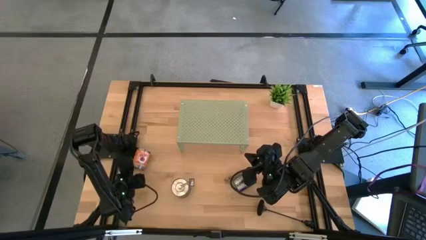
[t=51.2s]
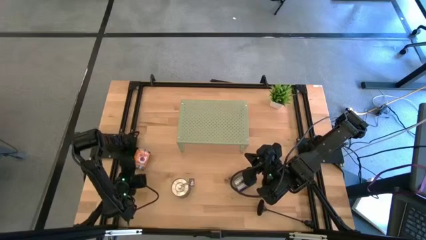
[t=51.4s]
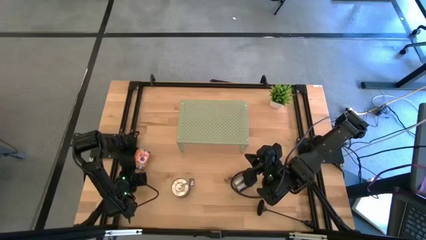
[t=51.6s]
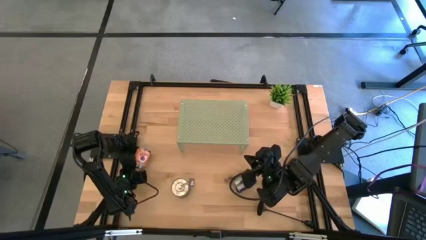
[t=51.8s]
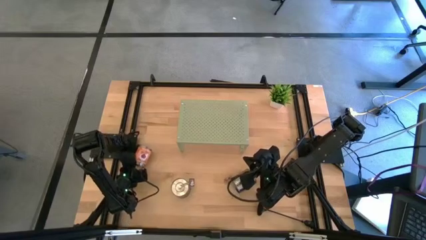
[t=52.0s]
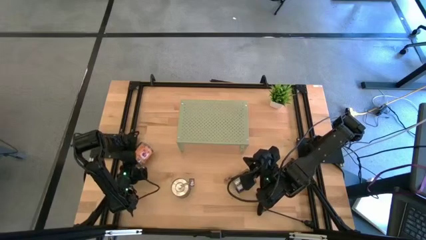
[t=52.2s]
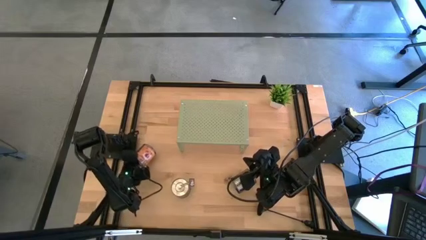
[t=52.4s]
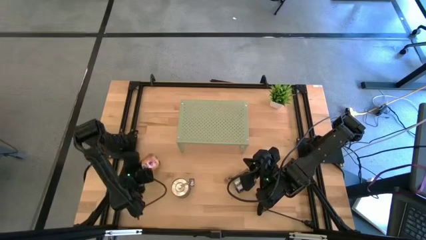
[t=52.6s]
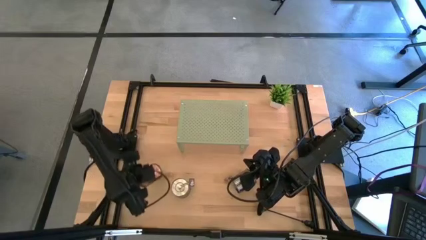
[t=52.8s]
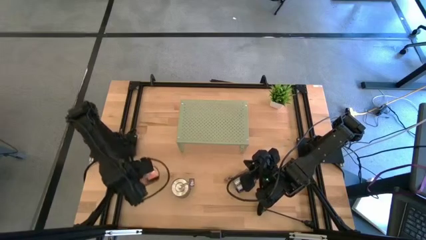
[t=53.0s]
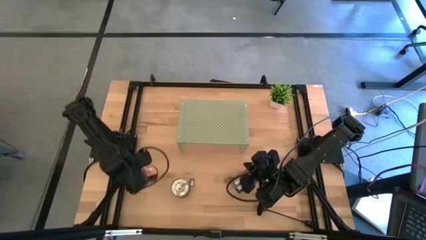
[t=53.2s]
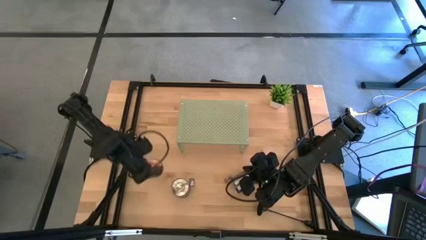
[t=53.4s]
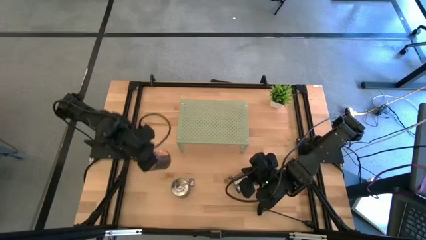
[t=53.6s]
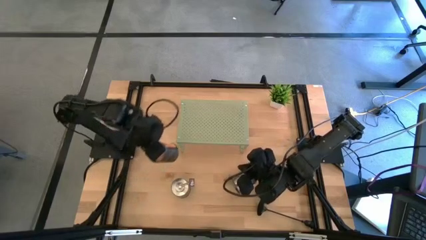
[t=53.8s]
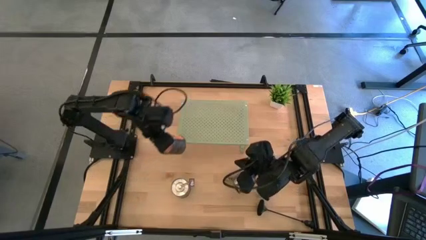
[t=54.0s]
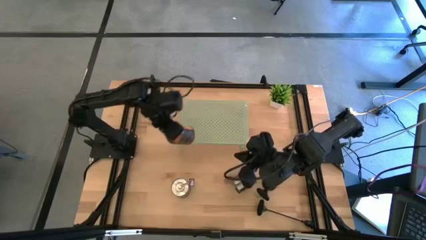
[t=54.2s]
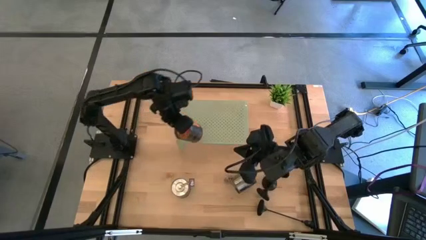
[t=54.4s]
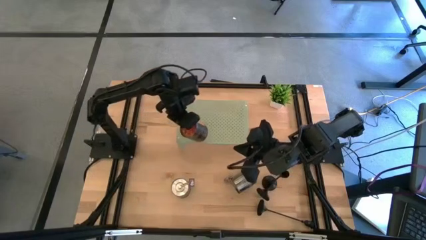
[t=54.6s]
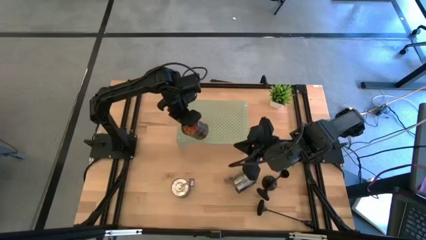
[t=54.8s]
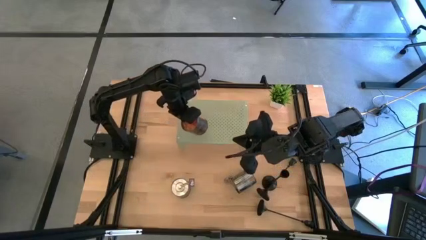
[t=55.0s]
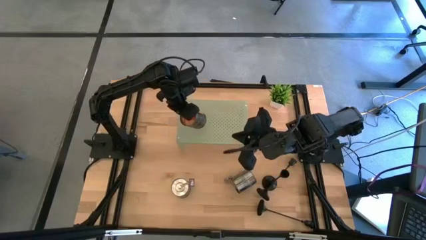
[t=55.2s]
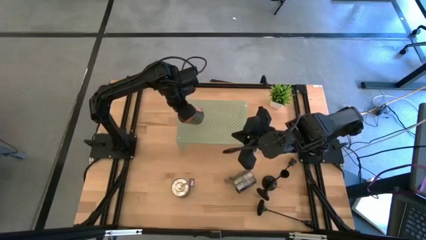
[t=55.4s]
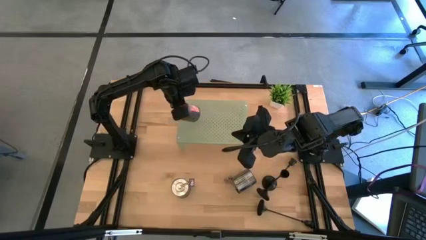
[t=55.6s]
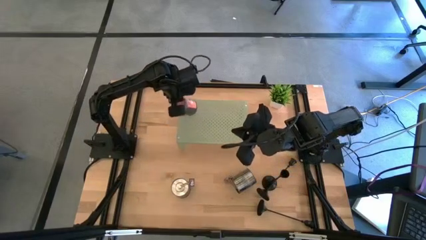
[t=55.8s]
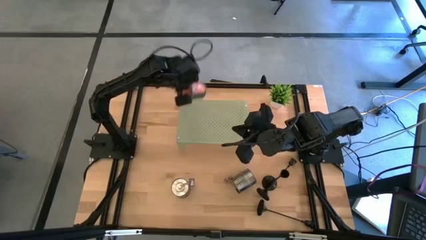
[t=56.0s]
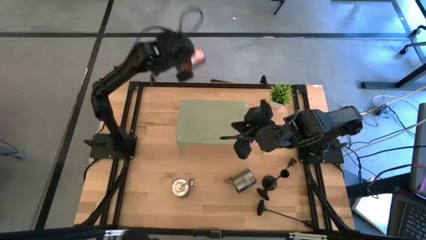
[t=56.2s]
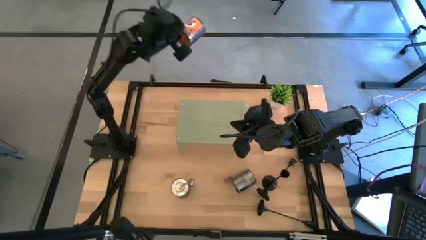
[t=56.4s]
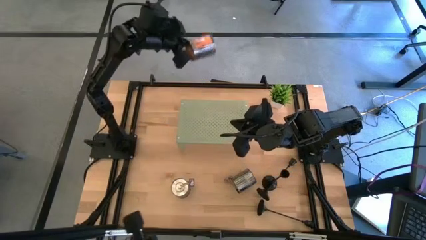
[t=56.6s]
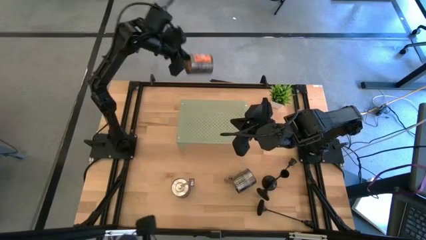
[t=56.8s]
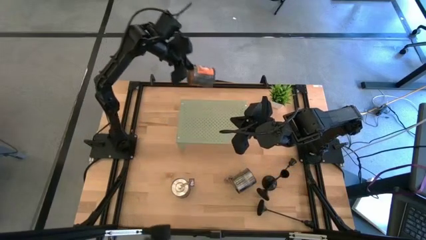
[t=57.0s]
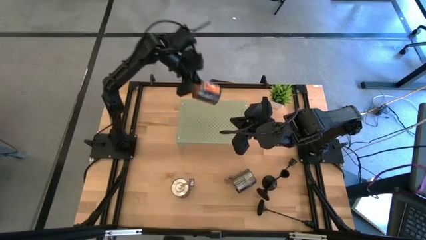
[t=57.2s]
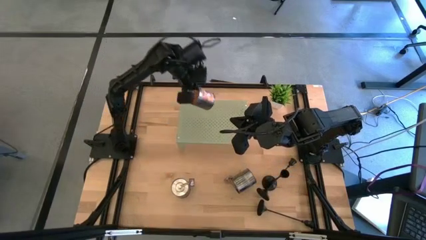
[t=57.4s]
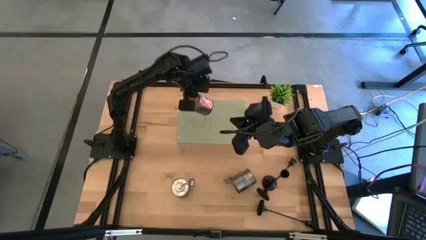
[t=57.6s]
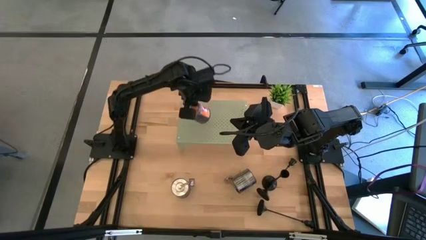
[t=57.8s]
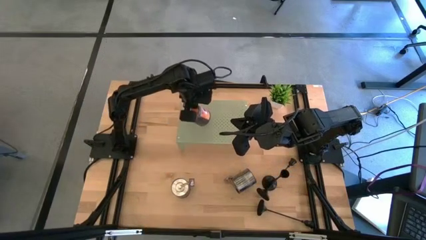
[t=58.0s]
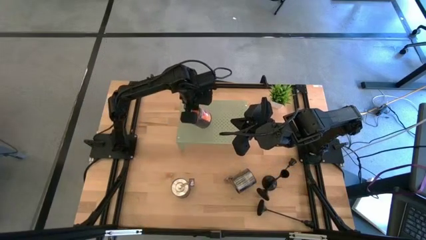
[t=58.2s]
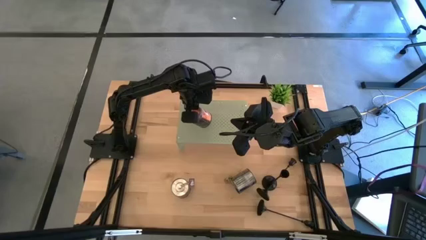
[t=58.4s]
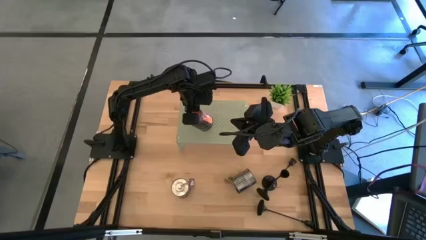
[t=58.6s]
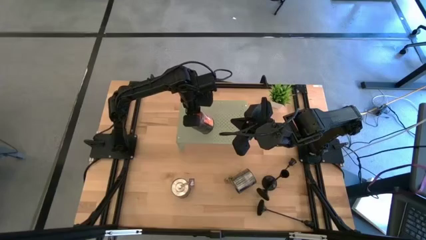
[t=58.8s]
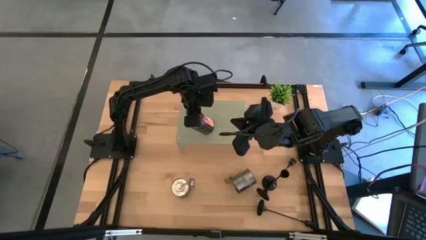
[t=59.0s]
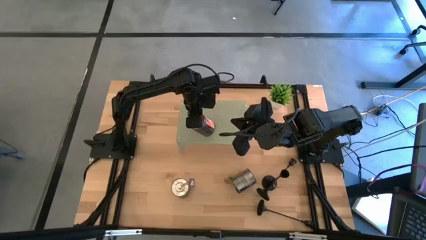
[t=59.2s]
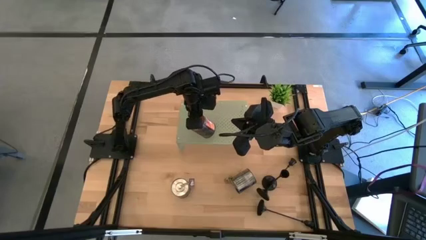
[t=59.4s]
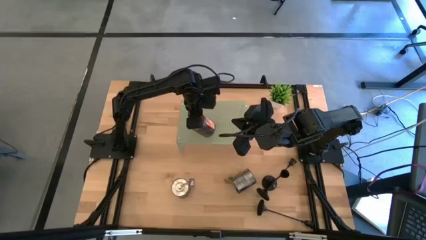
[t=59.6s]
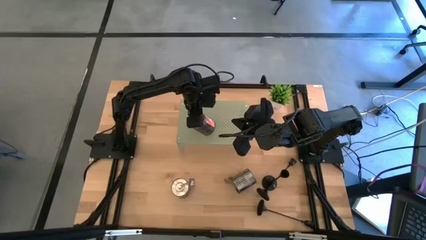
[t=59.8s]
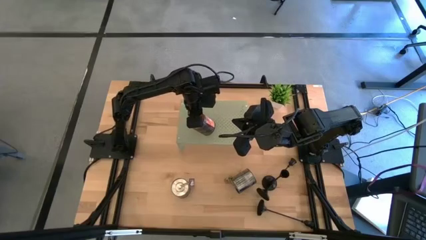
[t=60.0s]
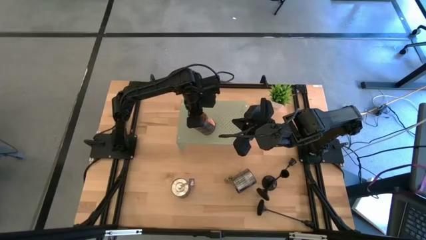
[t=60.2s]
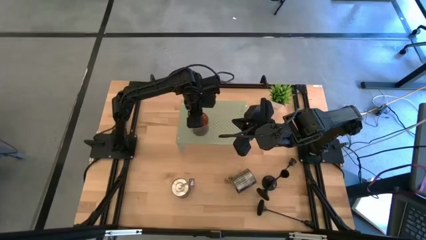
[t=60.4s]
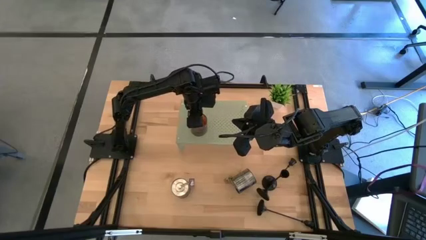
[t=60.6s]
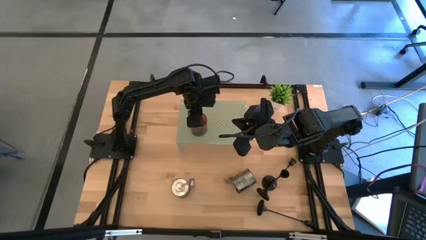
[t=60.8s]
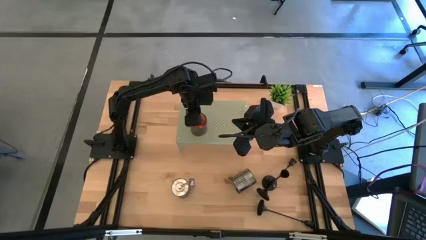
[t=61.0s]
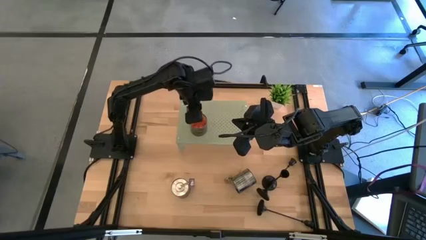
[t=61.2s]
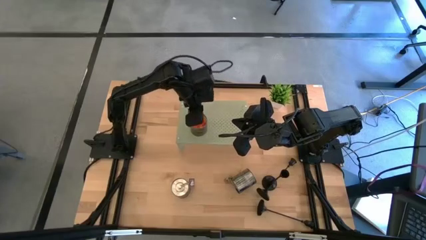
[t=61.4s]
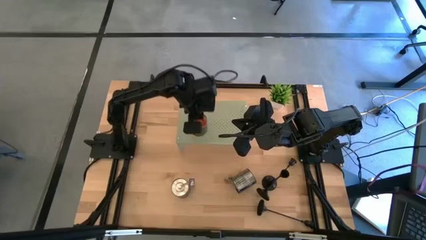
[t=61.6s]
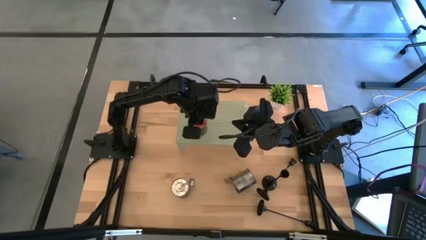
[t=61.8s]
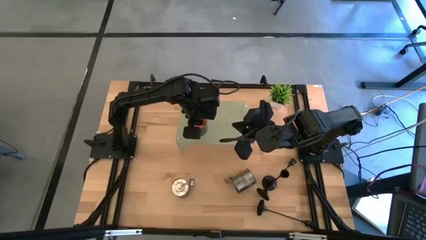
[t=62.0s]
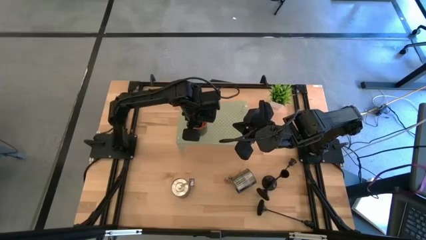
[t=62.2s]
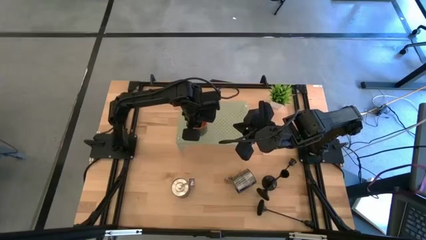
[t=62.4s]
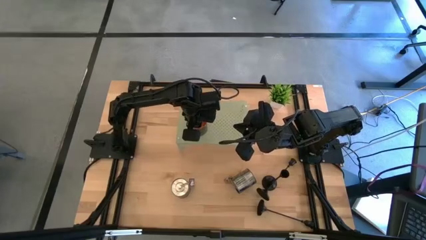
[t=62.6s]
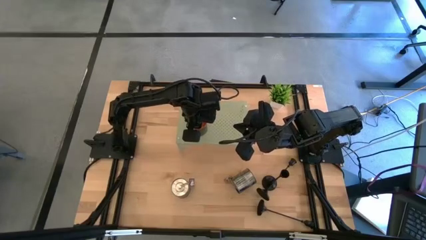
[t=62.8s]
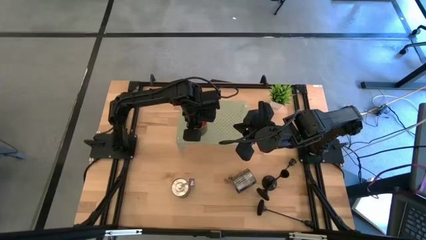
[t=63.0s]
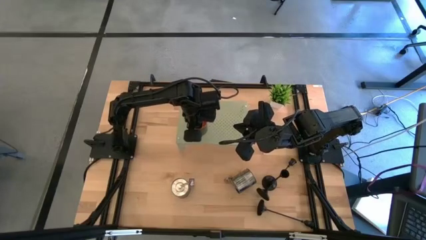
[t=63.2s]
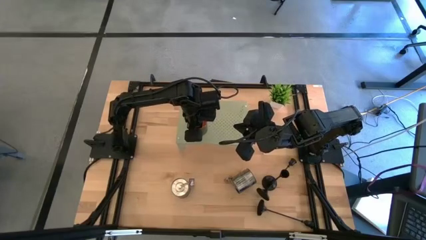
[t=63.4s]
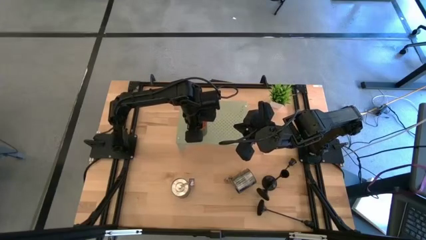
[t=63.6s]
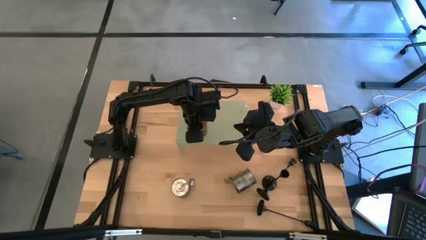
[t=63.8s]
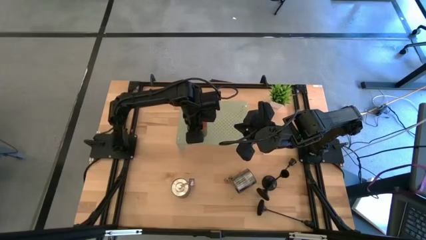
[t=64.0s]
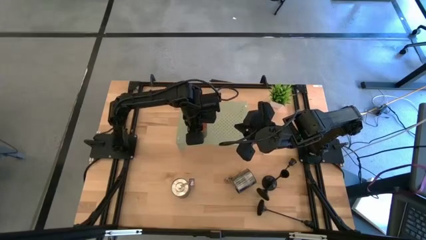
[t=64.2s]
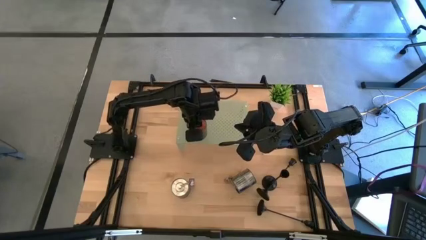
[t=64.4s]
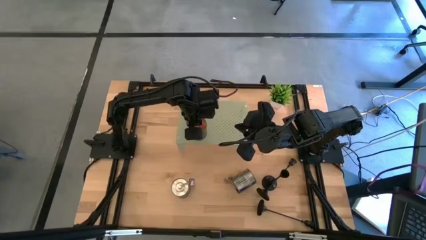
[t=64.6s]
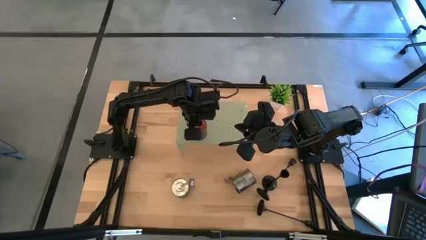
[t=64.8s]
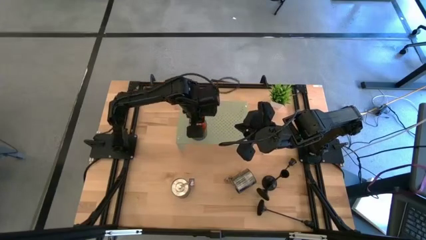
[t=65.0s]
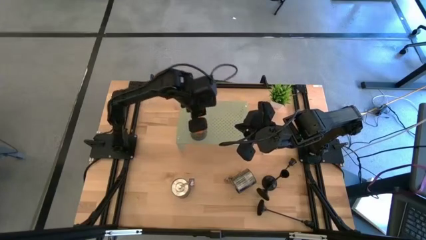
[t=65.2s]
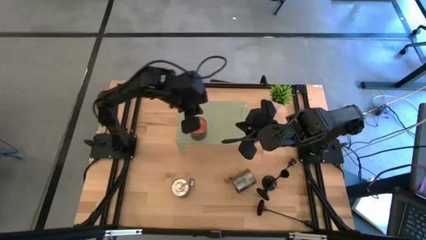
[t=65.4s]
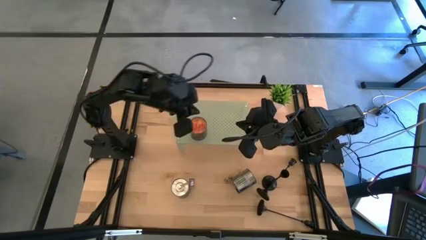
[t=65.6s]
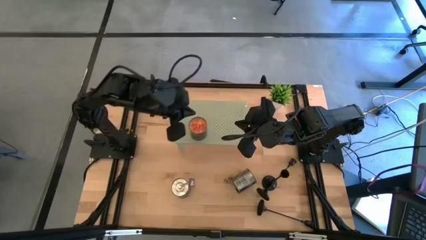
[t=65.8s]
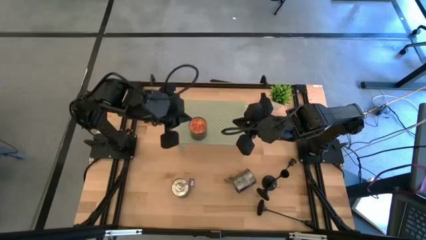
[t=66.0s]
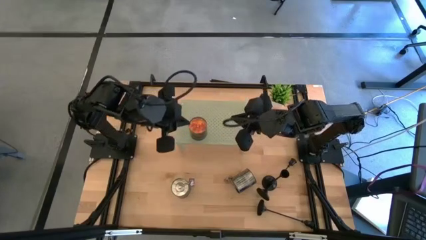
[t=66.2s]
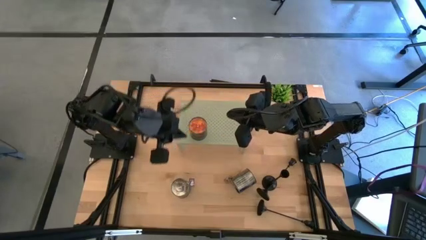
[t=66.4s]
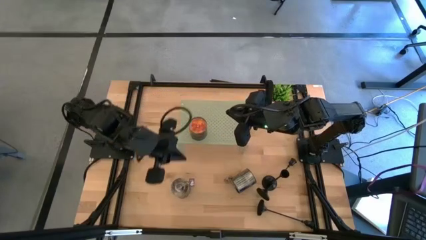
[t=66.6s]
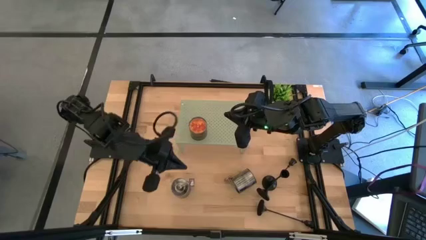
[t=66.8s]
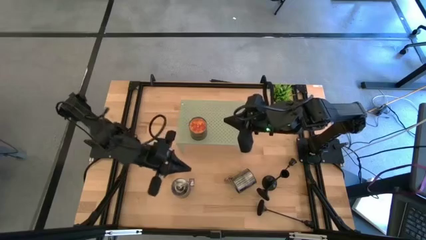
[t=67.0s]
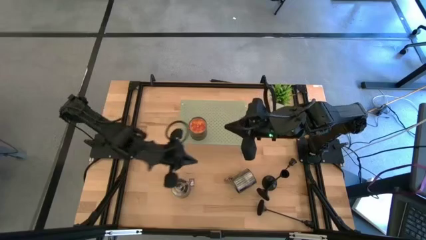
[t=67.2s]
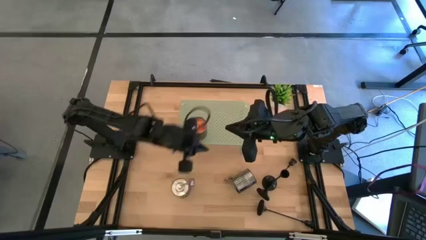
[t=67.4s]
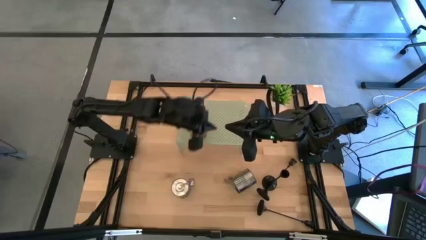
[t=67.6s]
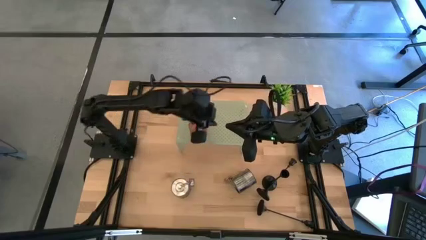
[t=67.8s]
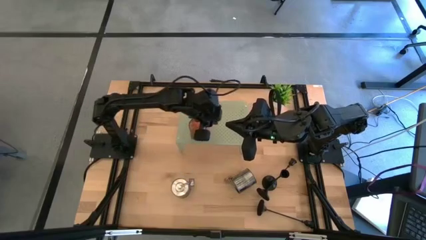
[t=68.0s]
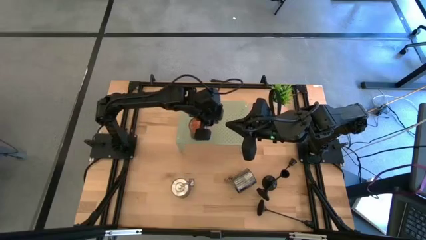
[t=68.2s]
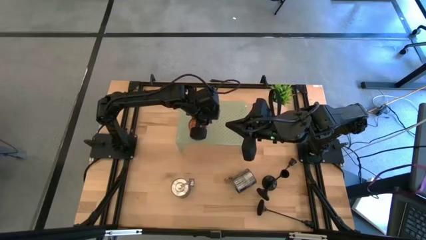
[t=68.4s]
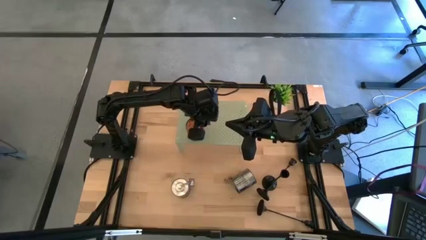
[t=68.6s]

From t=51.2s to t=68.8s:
Task: Pick & Place candle stick holders
Put the orange scented candle on the shelf
